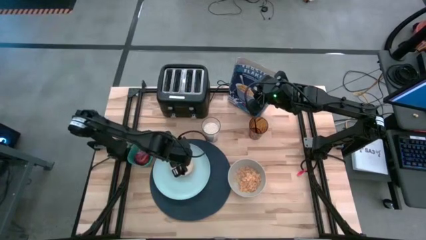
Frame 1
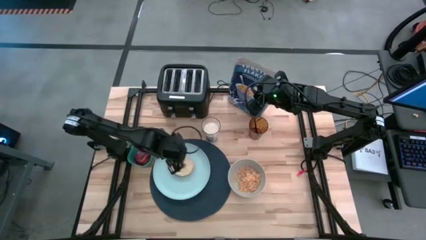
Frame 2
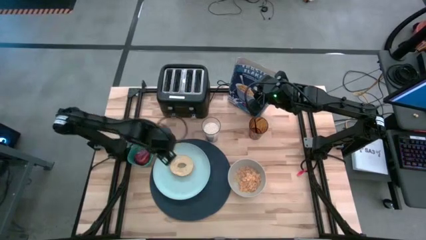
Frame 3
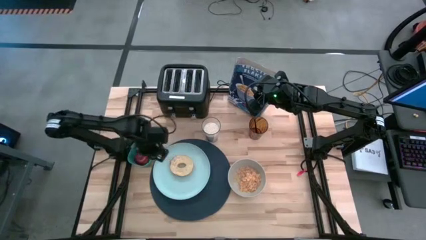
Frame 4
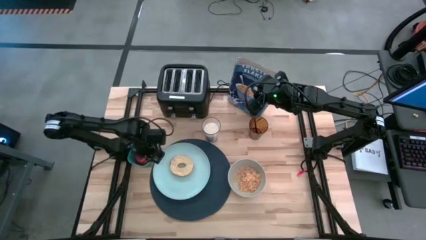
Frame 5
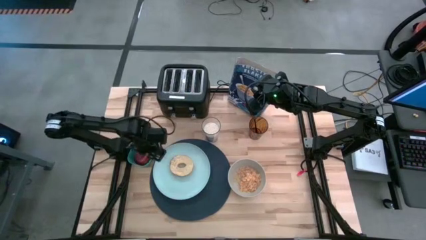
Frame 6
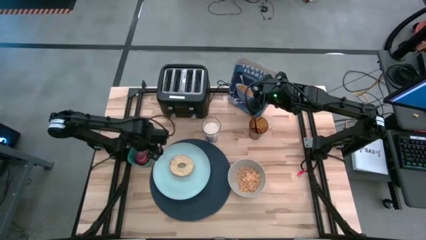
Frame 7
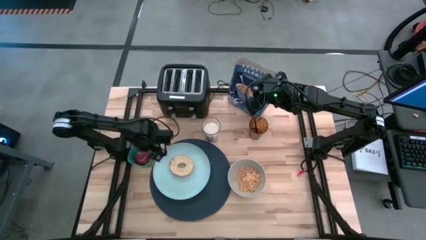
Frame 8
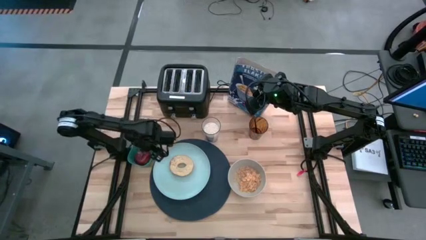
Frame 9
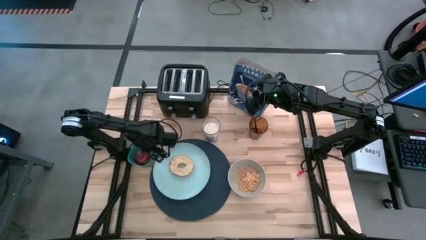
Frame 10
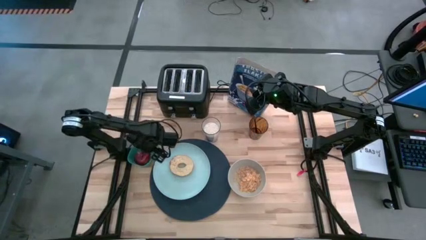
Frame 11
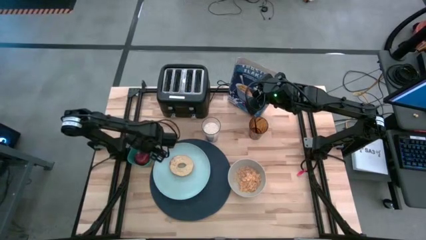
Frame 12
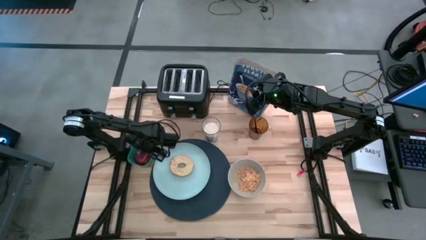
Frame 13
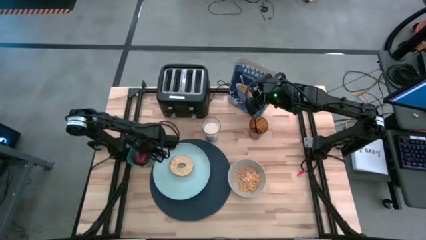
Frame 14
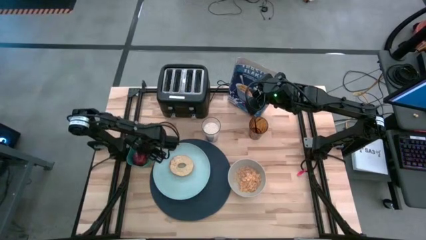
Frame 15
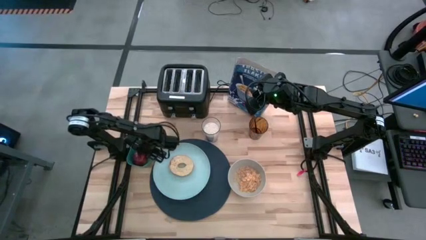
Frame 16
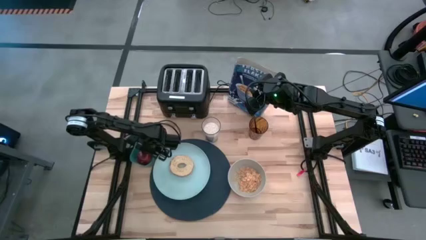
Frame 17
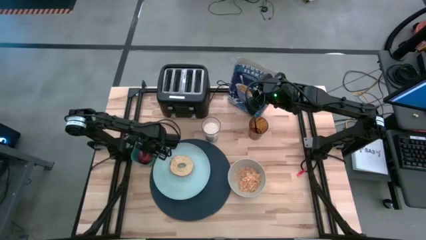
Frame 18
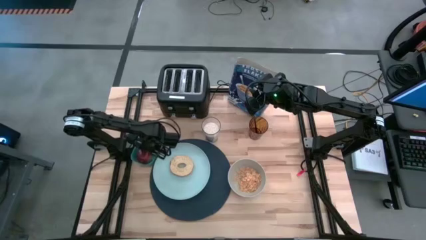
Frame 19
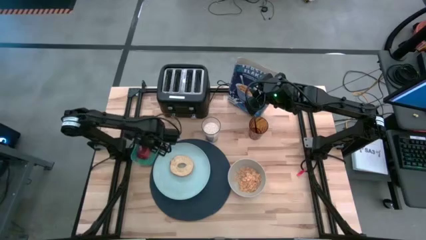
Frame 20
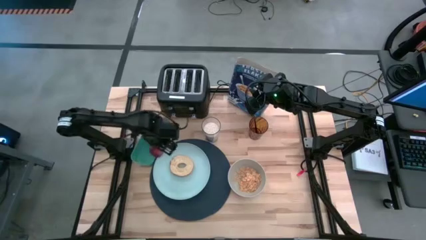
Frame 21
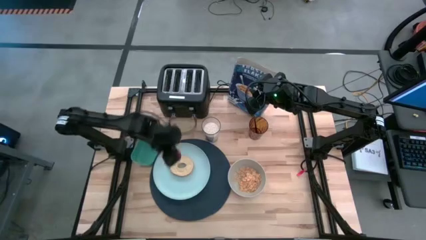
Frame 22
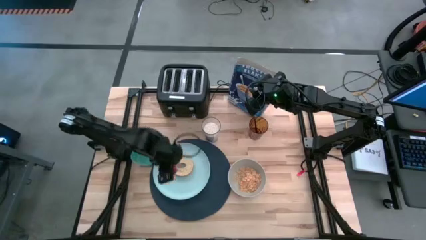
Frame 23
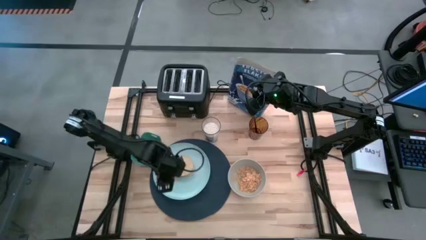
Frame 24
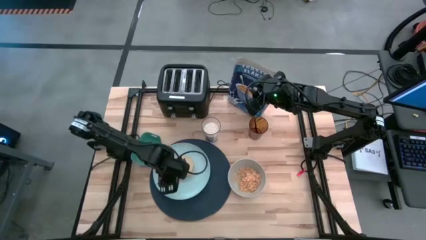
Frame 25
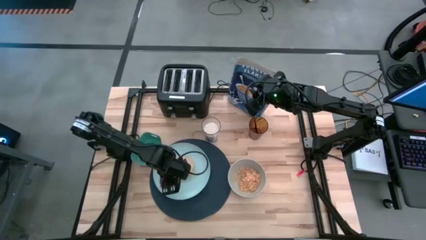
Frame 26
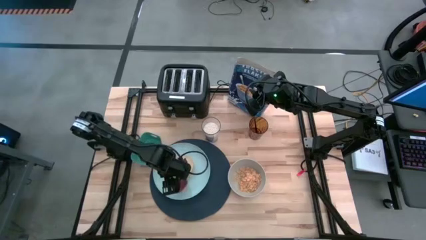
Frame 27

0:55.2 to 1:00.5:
Task: Arrange a breakfast setting
Put the red apple on the blue plate

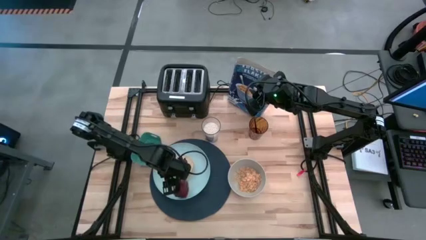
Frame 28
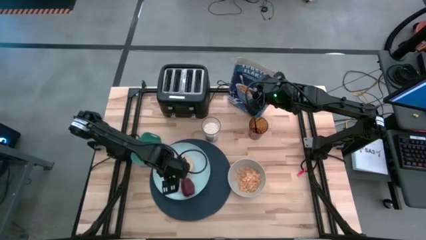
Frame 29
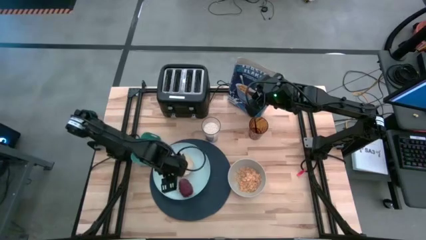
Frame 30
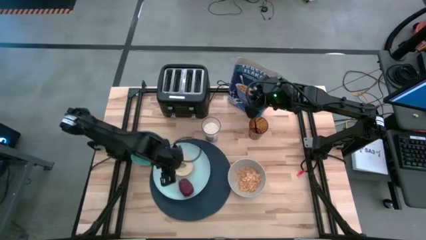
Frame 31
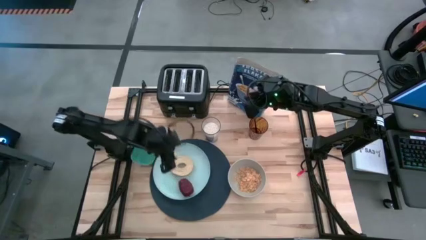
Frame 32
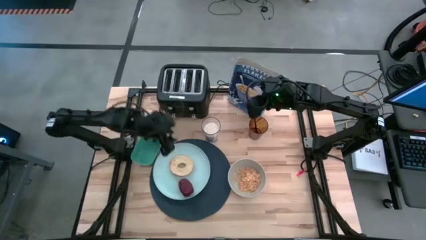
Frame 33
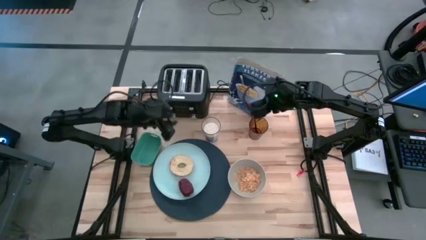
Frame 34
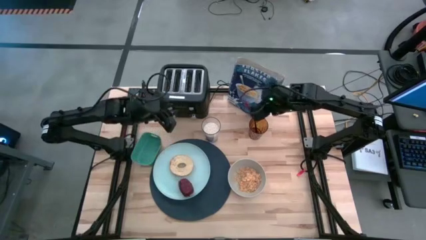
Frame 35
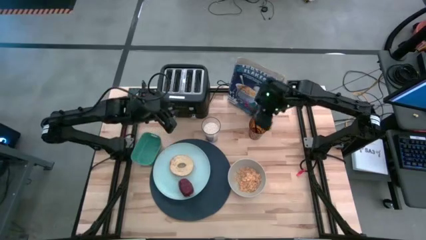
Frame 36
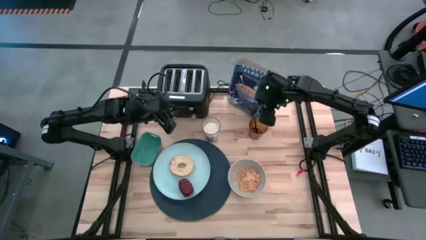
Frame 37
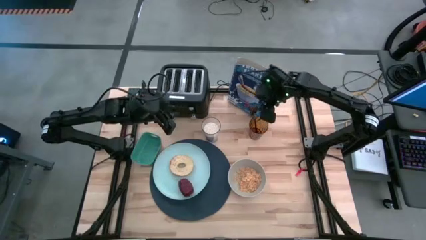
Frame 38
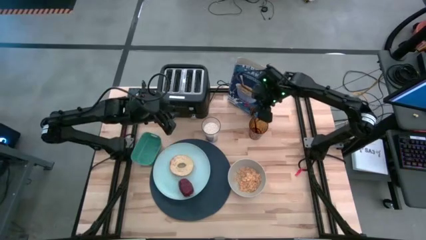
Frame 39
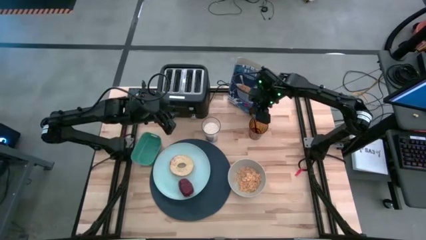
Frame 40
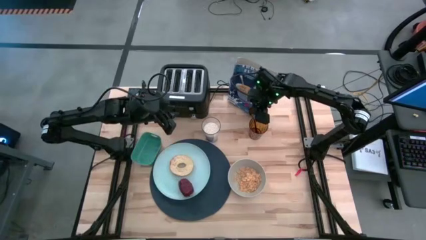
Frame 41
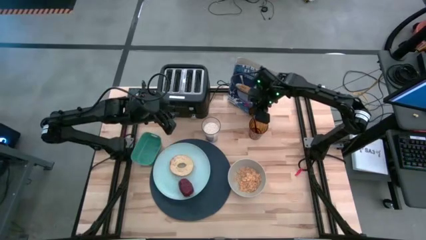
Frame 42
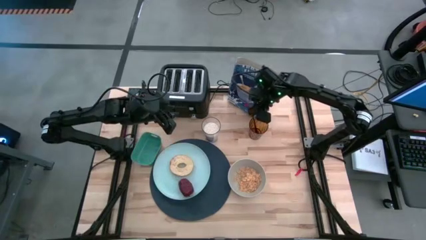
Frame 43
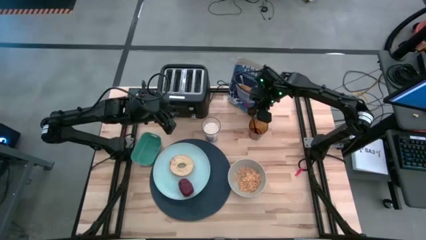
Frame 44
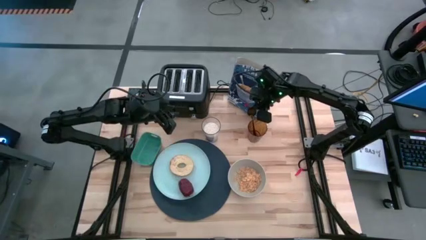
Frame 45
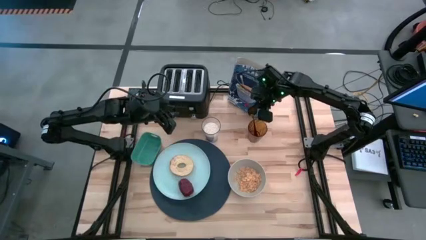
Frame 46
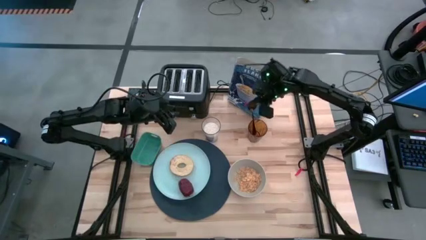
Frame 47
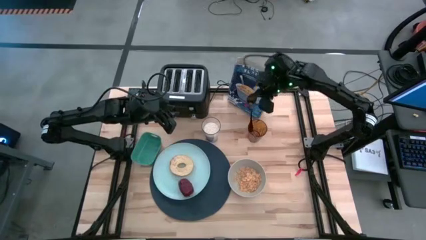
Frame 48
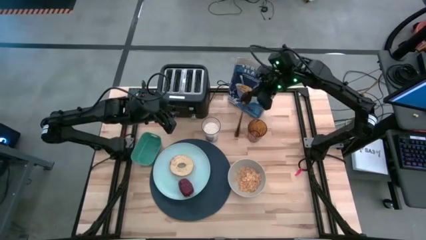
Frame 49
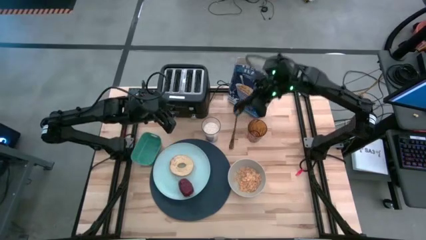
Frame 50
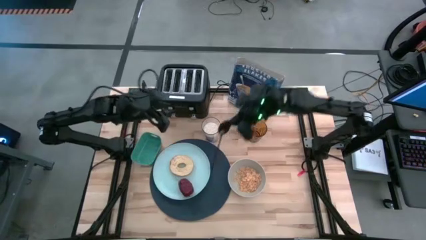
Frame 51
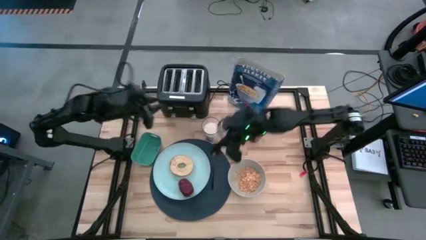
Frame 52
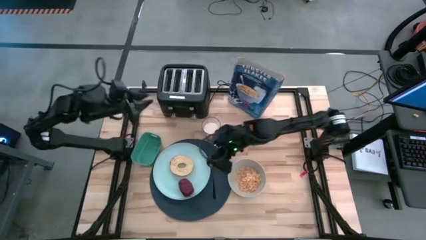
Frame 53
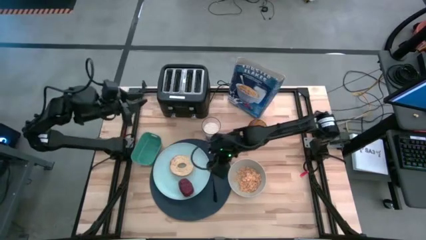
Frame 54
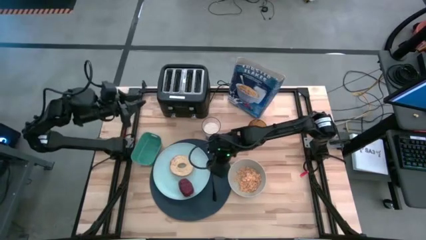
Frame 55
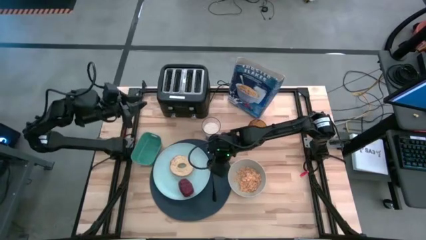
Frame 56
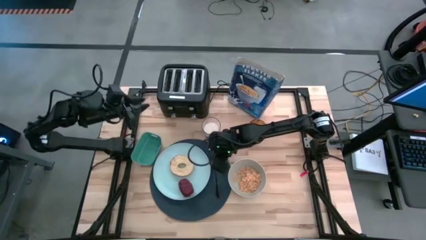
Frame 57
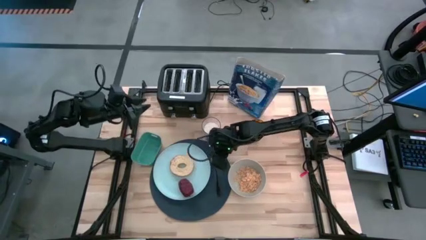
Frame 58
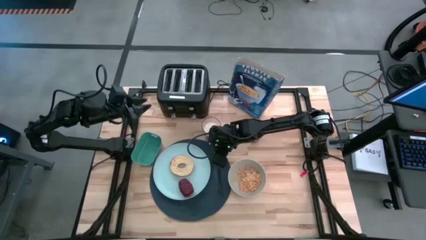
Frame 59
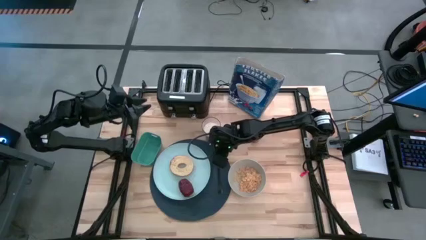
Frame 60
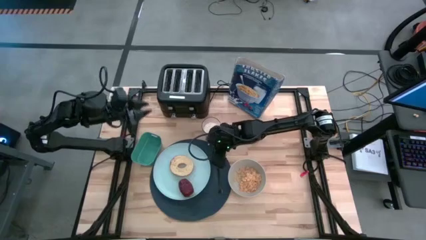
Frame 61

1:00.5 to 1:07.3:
Put the black spoon on the dark blue placemat to the right of the blue plate

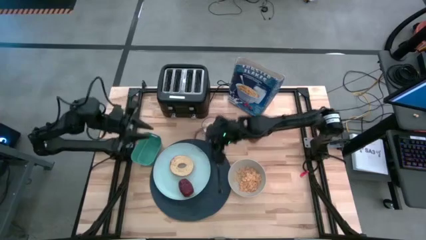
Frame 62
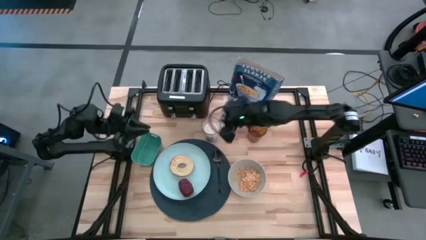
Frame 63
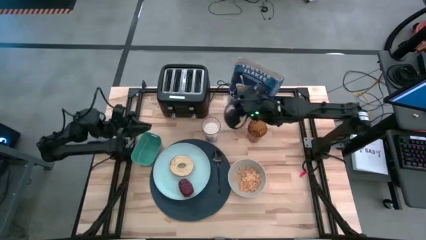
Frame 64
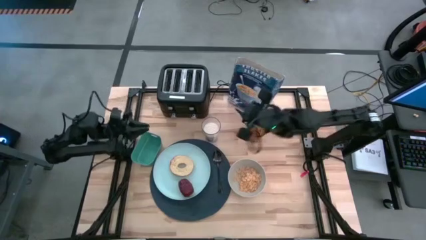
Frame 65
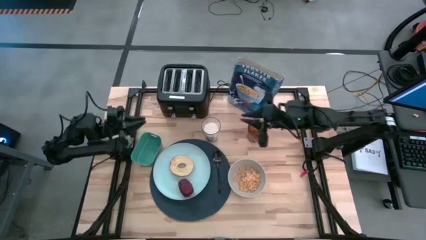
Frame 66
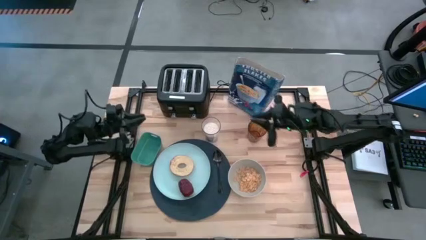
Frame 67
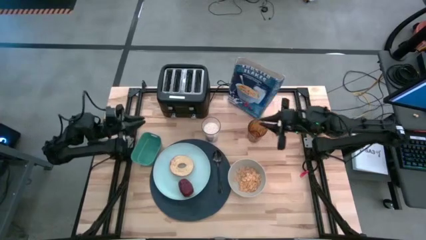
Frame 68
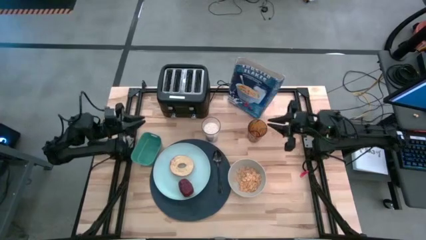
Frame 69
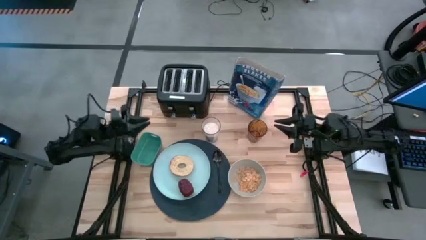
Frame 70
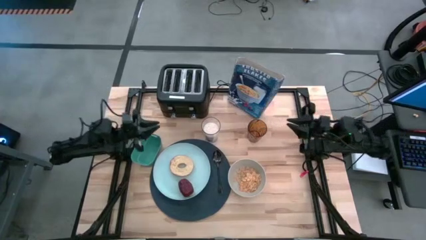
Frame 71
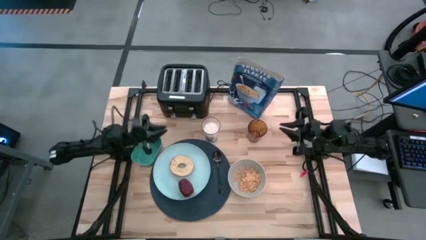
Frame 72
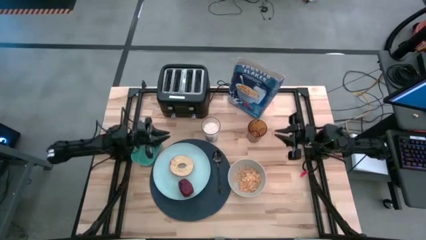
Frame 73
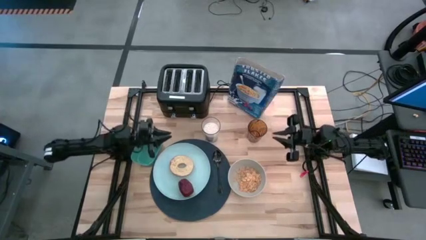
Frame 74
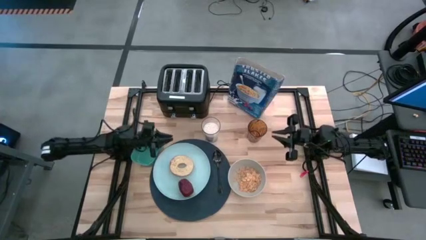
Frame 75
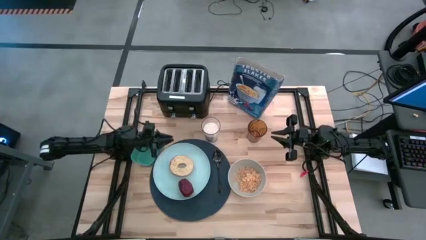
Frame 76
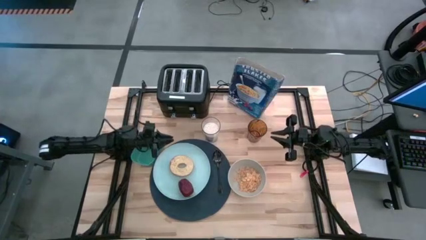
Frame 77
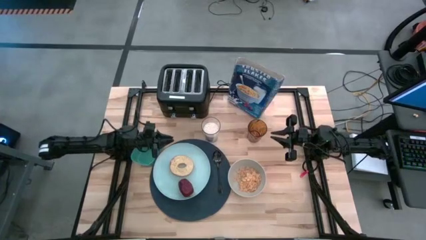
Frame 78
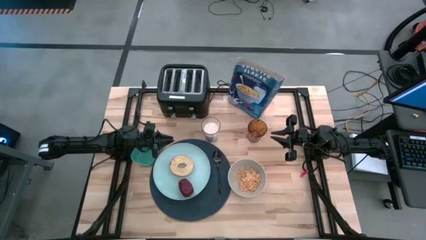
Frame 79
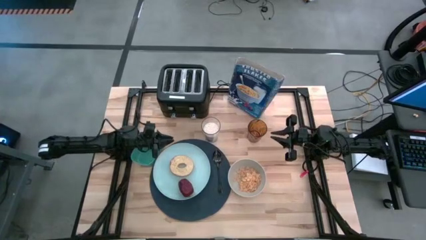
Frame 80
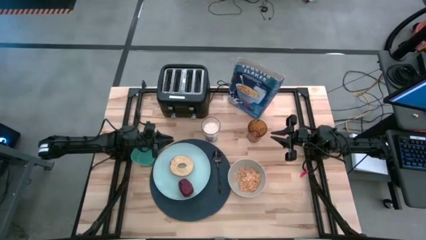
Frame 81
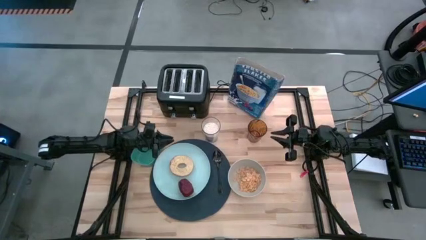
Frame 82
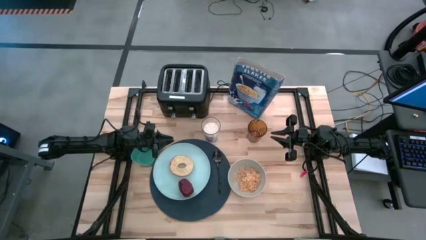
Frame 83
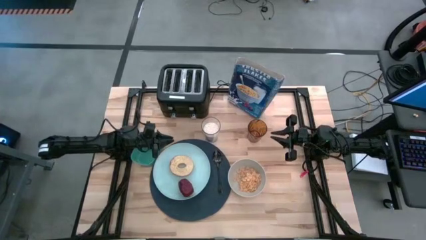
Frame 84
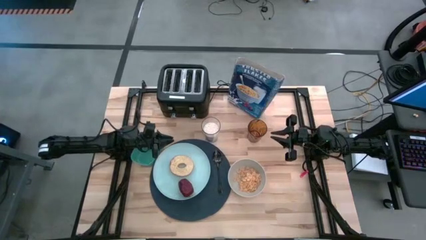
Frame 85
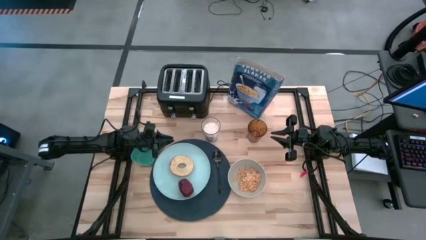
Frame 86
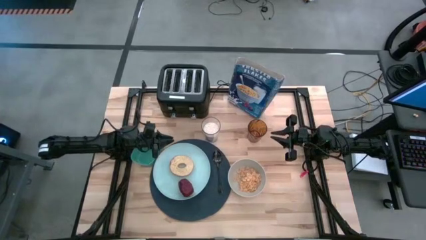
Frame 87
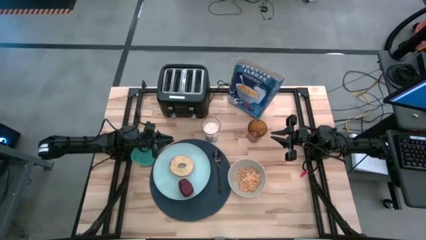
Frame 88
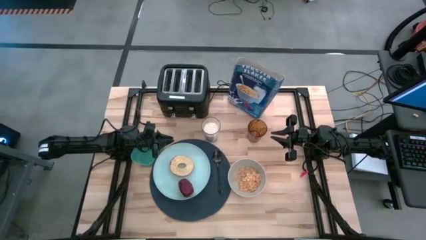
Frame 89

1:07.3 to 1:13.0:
Return to Home Position
